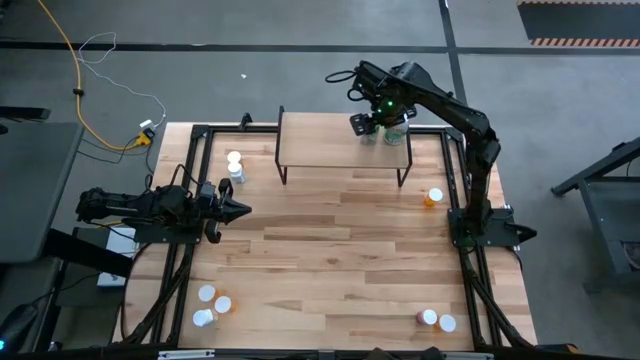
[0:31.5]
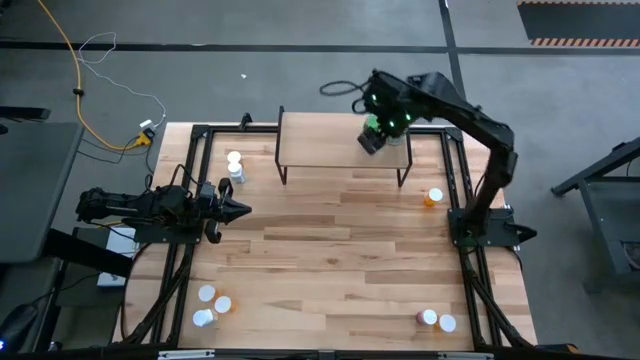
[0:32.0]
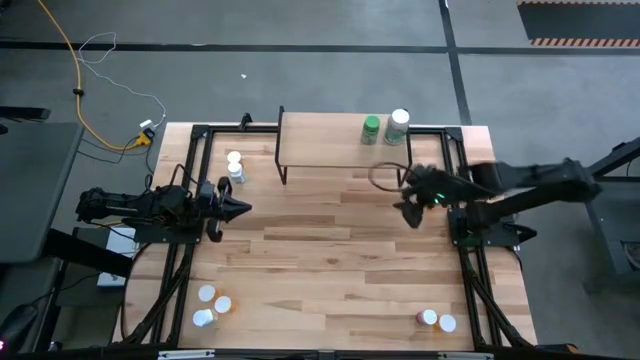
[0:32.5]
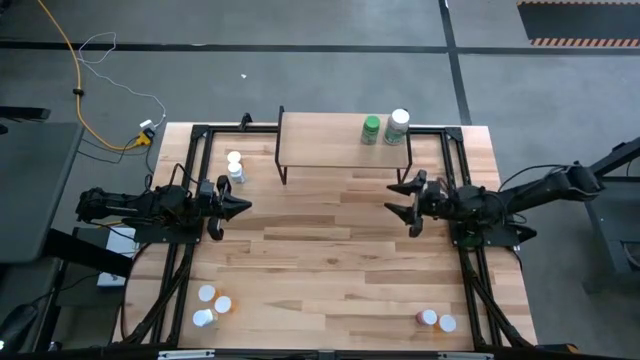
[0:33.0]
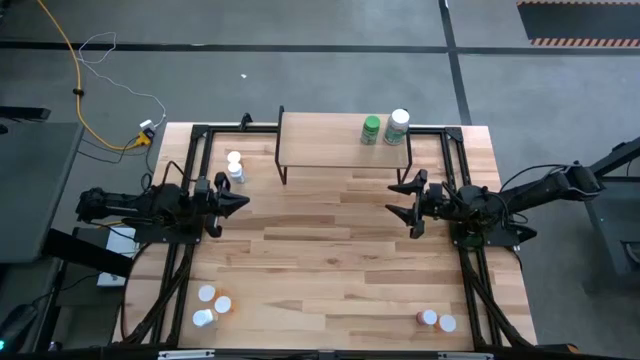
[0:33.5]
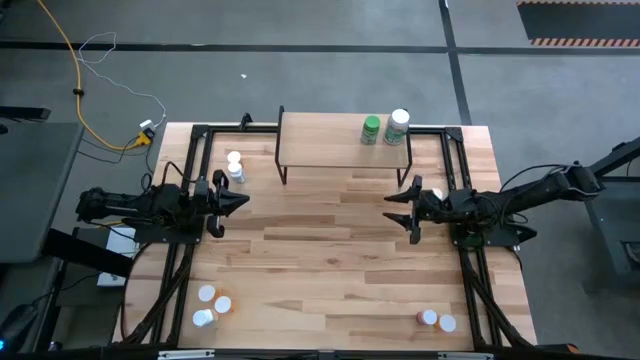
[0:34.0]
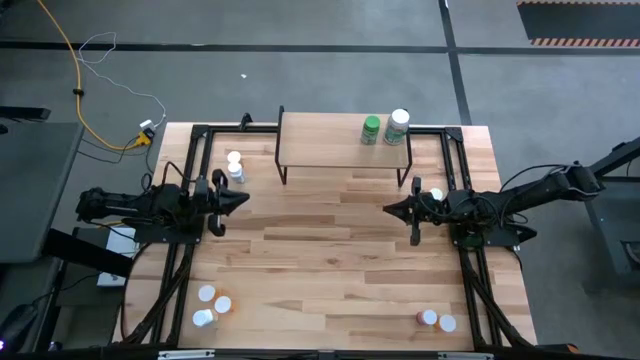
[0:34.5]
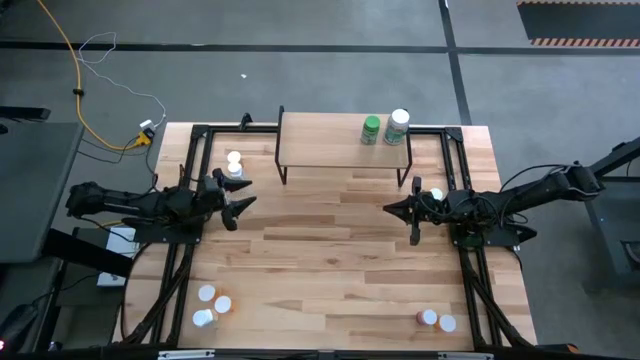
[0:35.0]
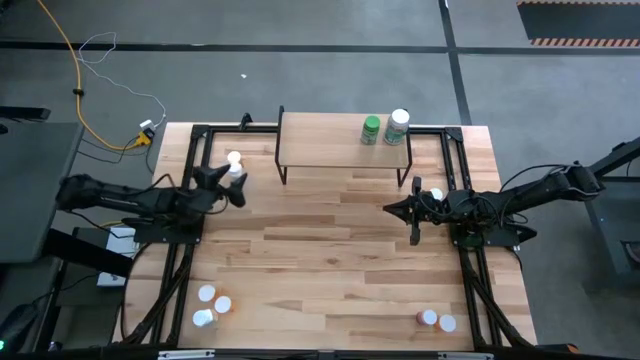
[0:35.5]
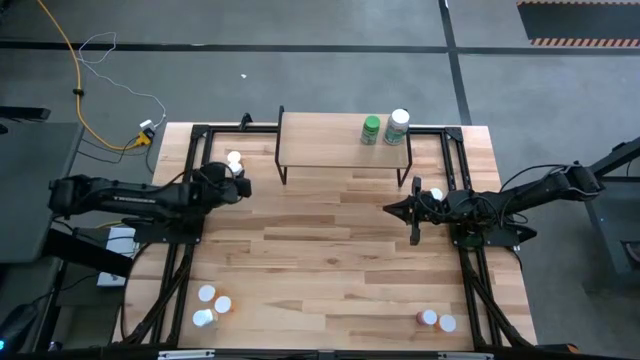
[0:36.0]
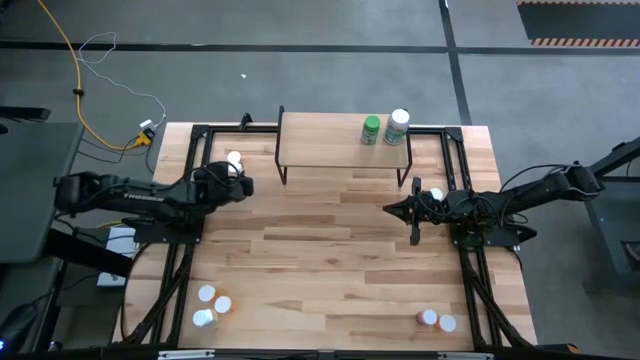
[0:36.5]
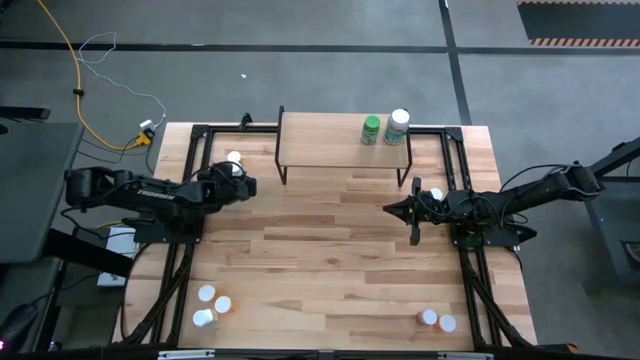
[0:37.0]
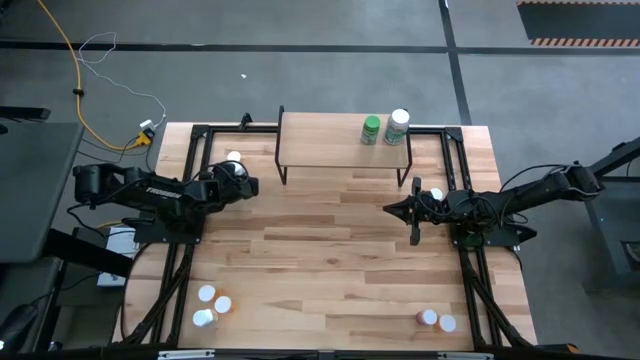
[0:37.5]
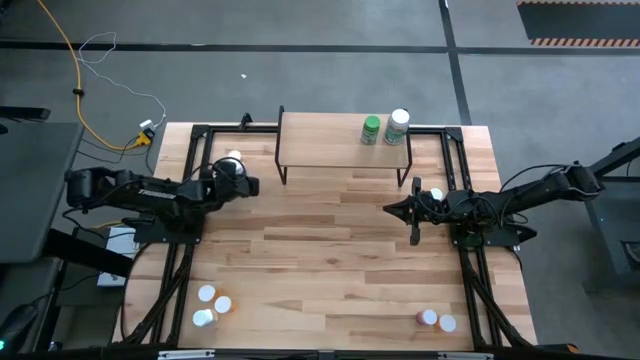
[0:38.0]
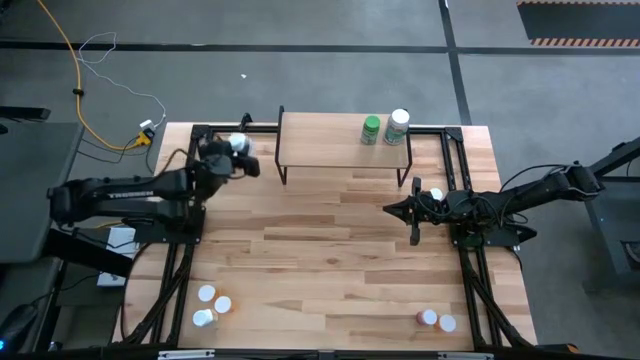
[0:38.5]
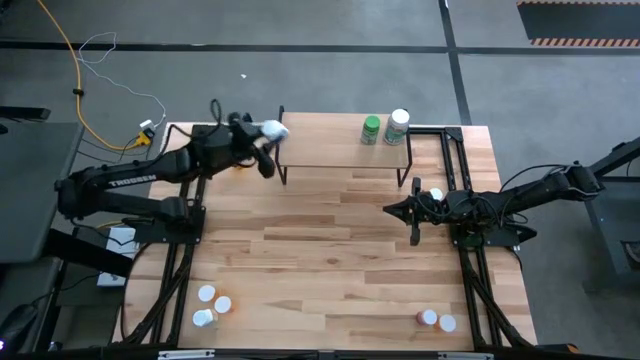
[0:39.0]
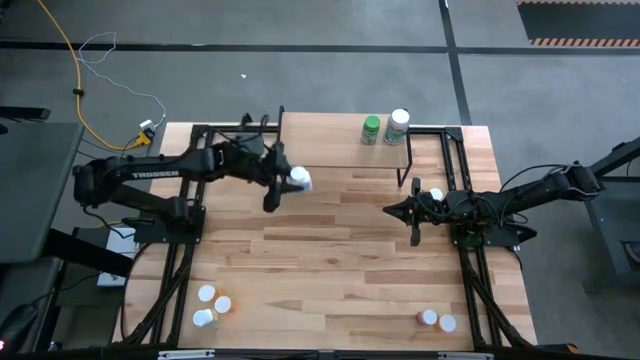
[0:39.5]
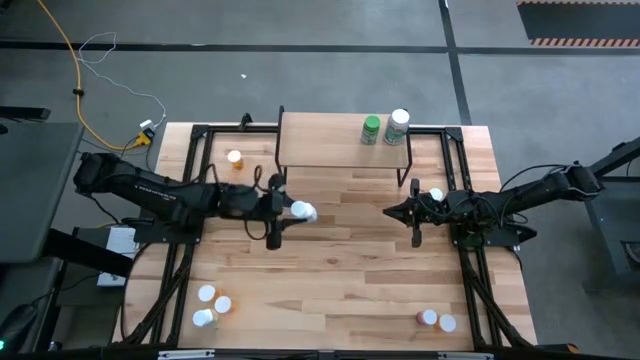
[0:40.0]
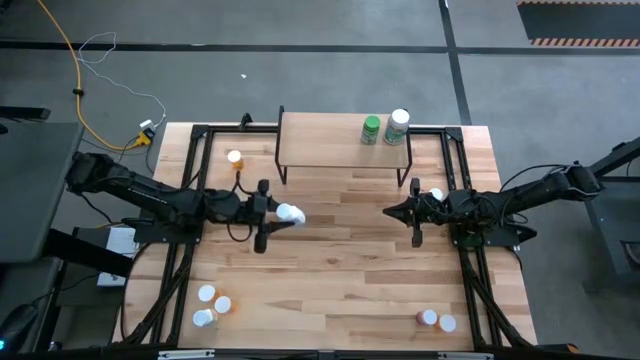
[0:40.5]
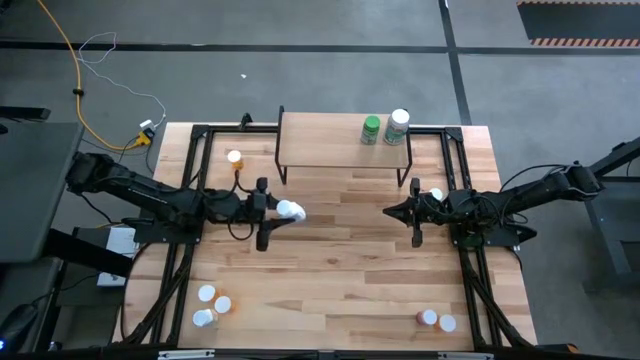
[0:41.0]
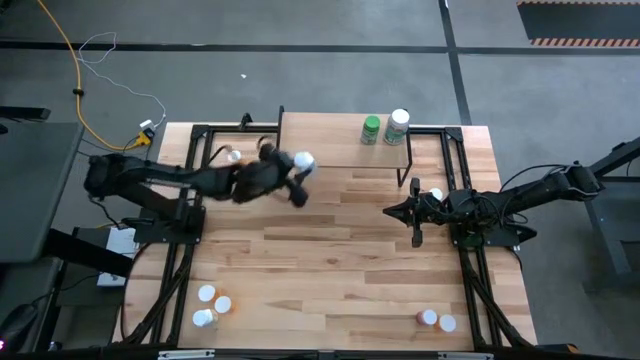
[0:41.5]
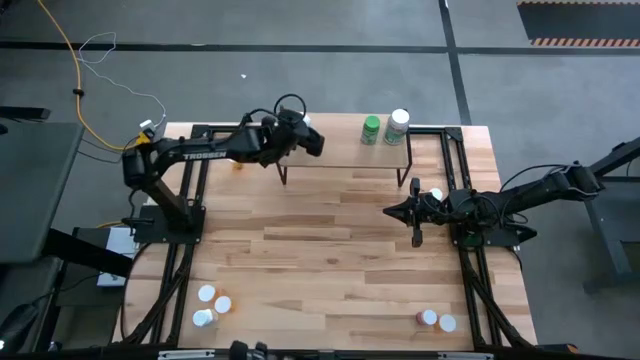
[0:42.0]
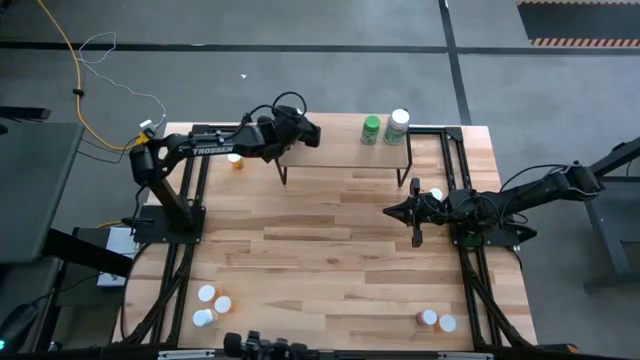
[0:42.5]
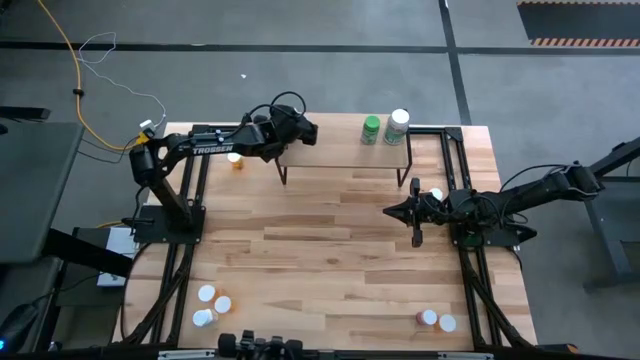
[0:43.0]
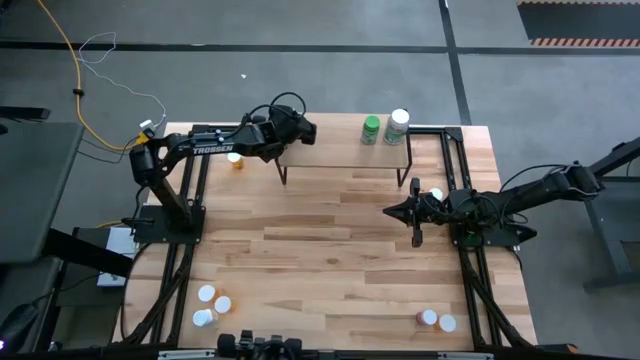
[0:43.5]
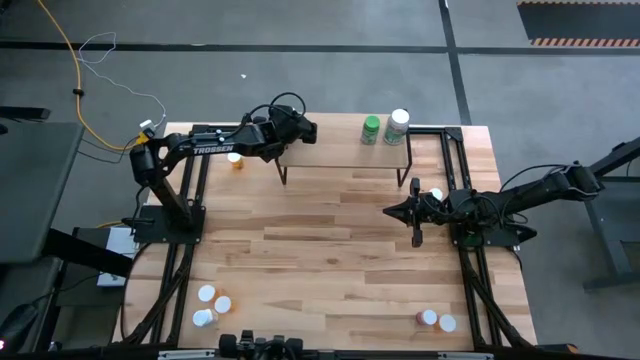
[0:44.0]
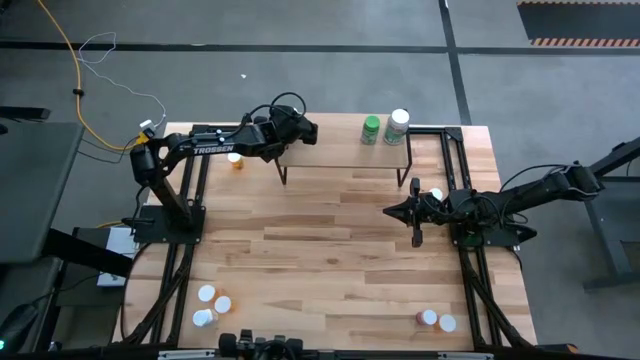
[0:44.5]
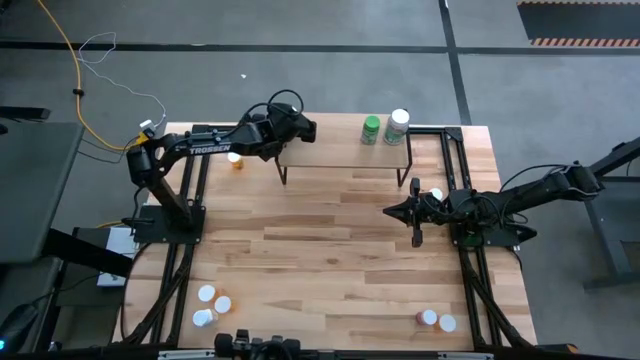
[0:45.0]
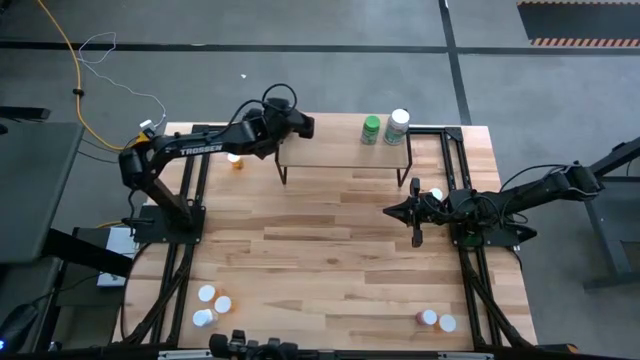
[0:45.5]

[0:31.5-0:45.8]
Task: Pick and place medicine bottles onto shelf by color
Put the blue pill bottle on the shelf

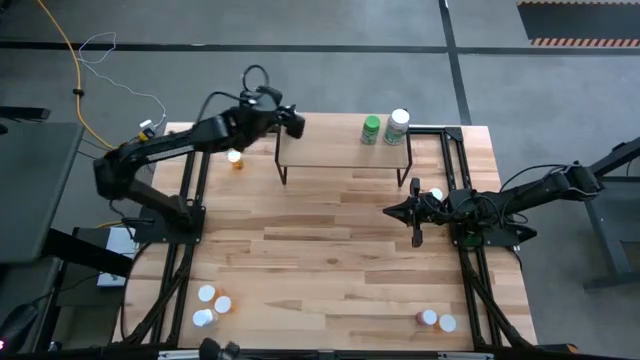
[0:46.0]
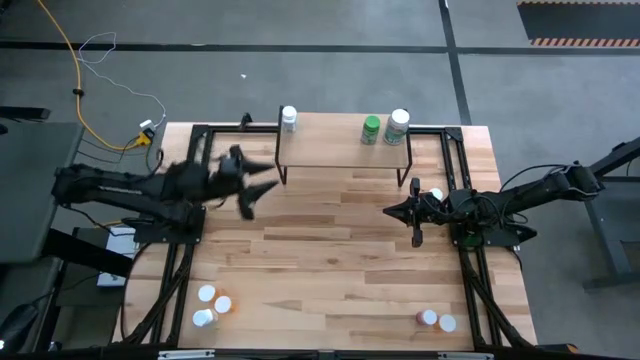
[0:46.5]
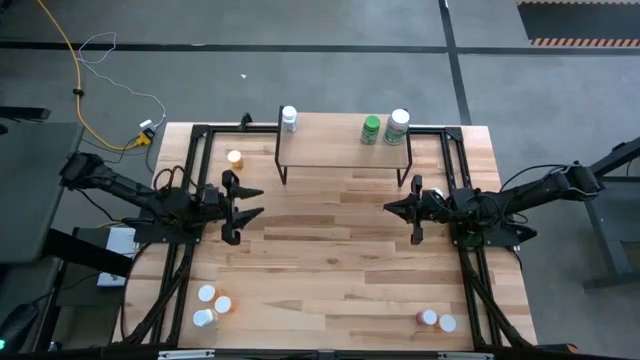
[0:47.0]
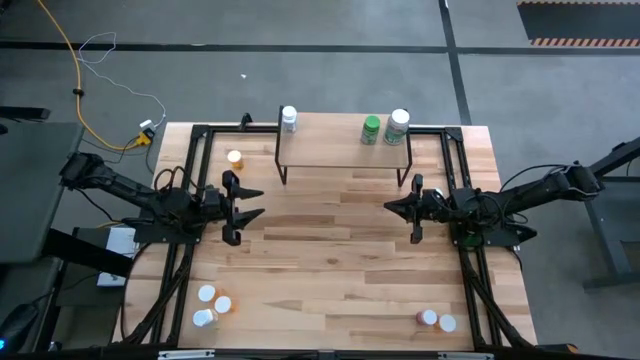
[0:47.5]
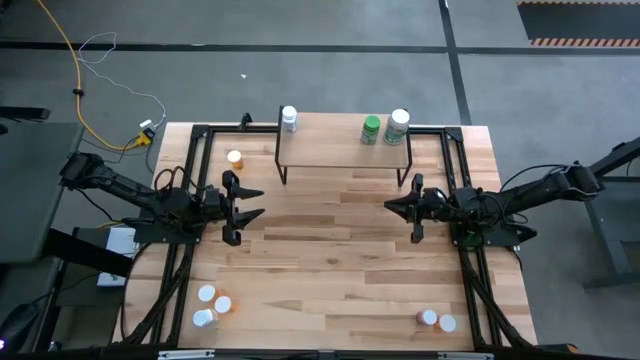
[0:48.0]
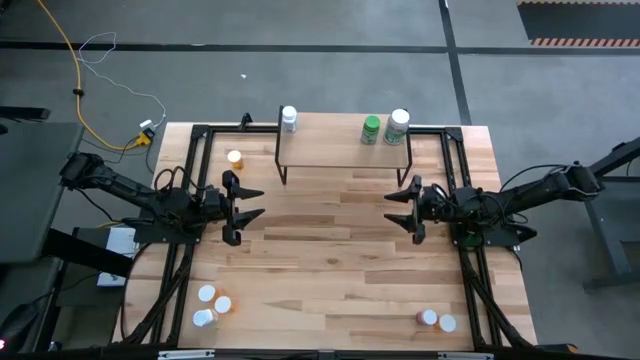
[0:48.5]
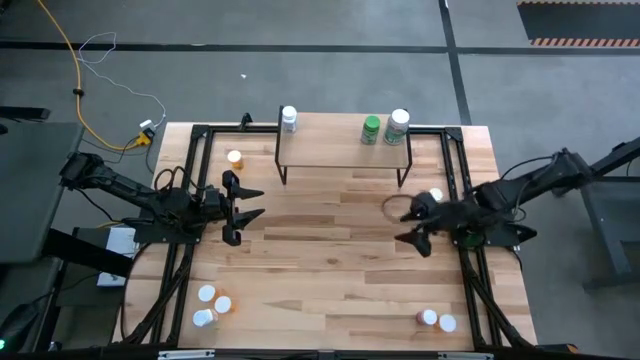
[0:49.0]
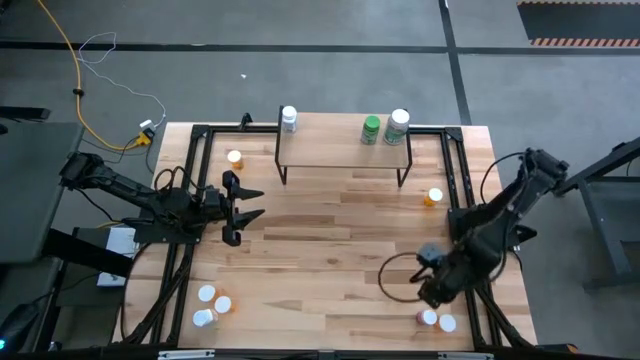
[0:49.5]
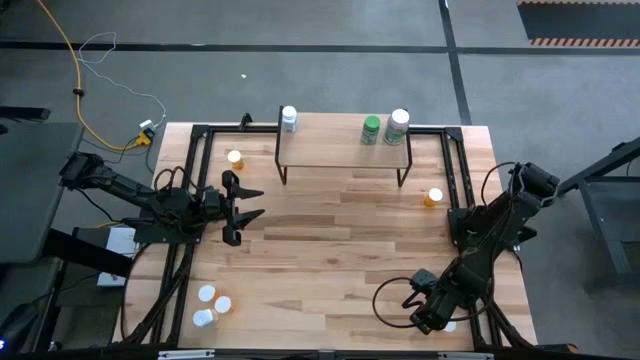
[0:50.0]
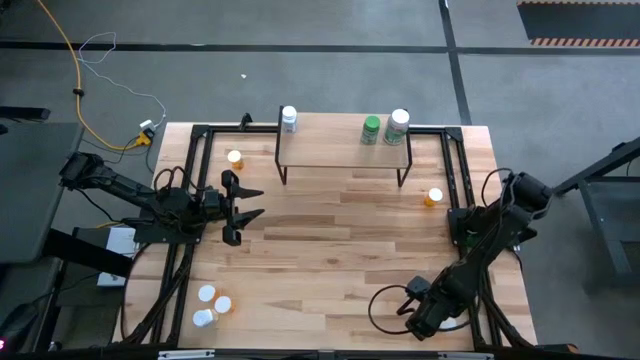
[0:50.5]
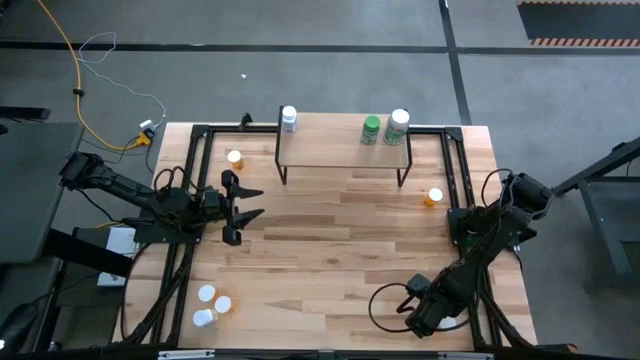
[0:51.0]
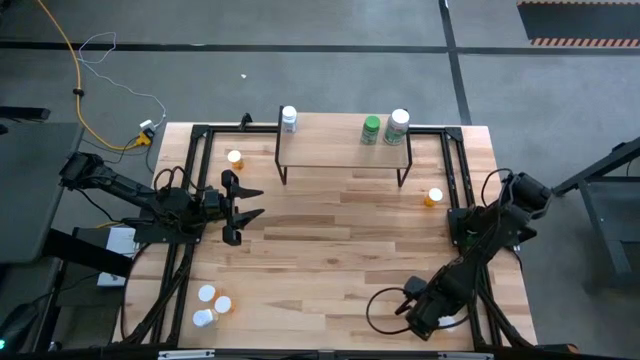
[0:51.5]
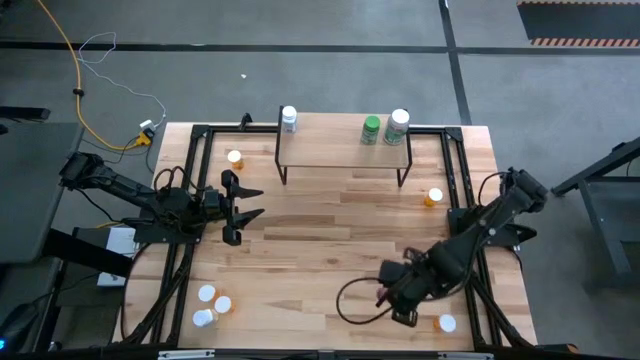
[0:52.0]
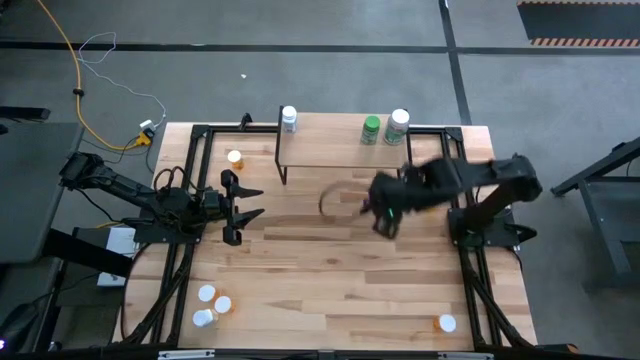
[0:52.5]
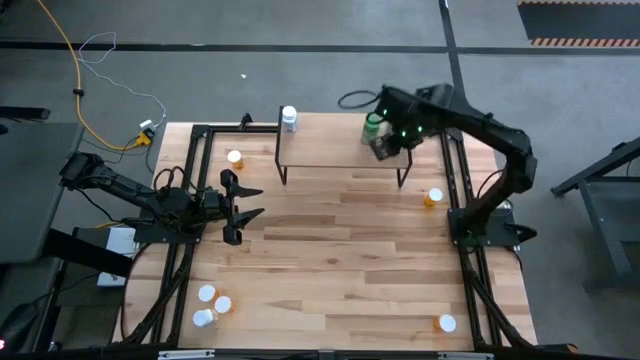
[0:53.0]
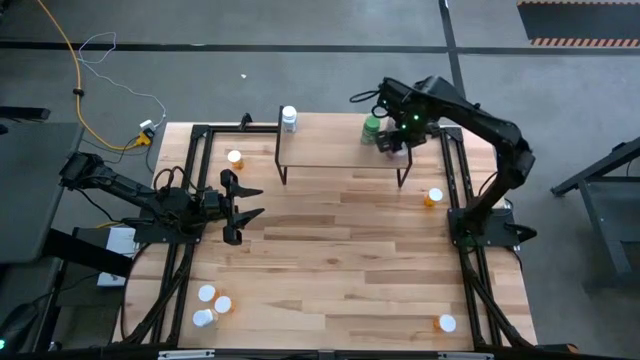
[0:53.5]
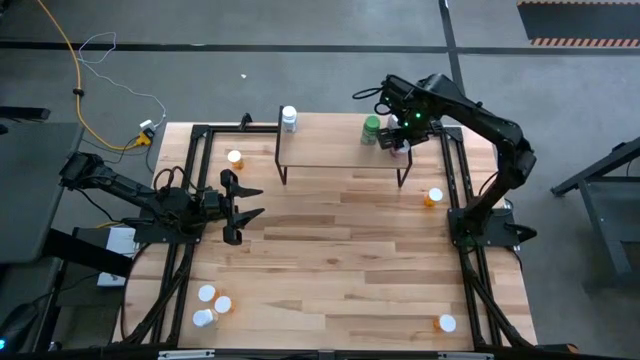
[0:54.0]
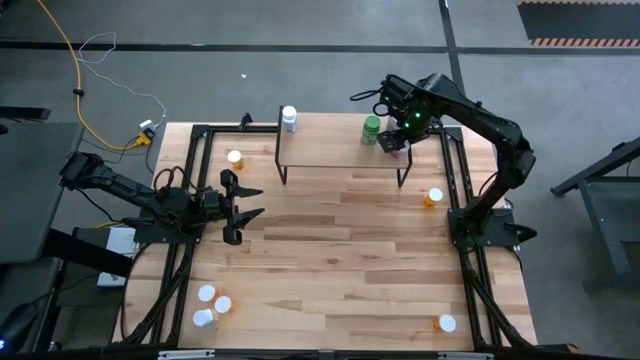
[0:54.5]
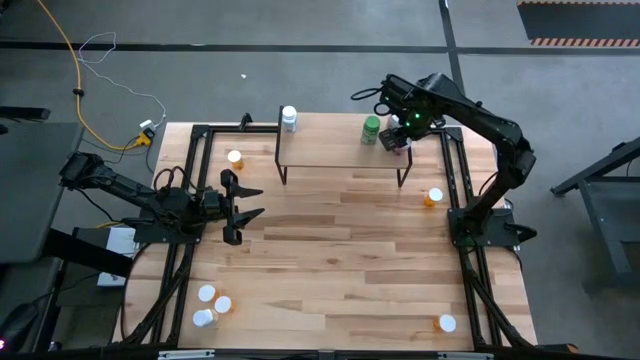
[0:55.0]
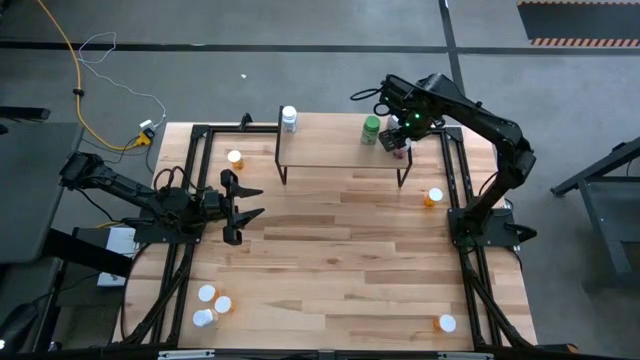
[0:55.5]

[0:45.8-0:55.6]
Put the pink pill bottle on the shelf
